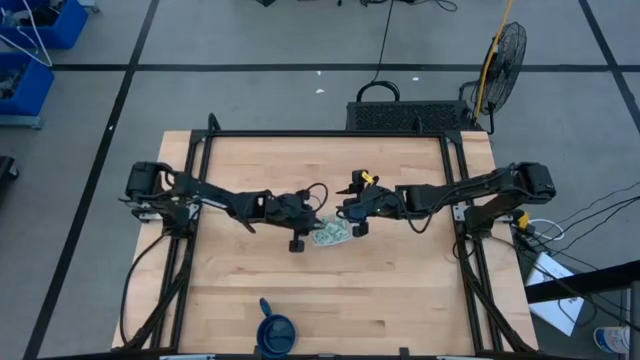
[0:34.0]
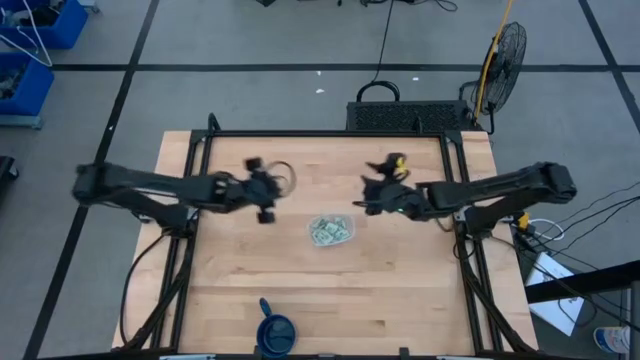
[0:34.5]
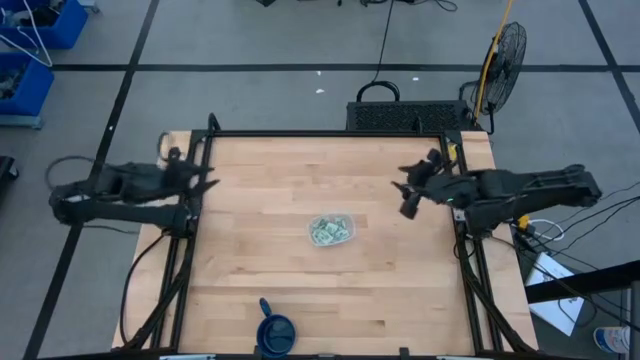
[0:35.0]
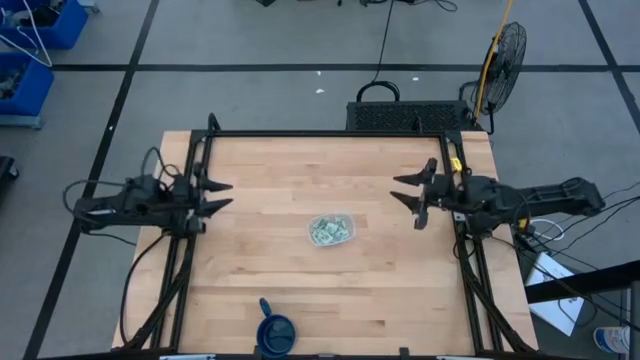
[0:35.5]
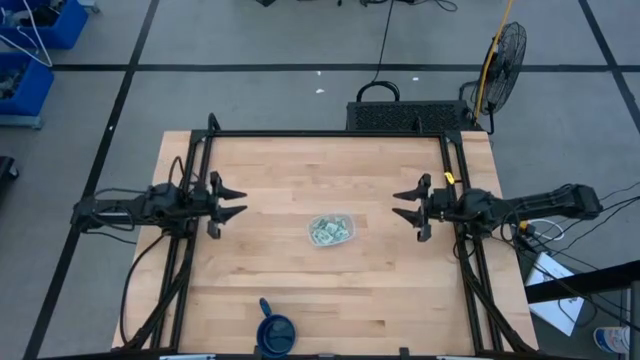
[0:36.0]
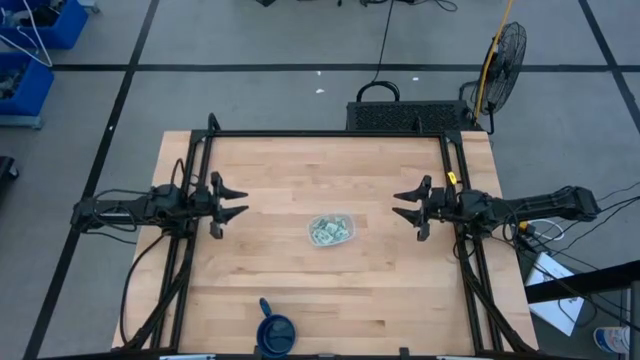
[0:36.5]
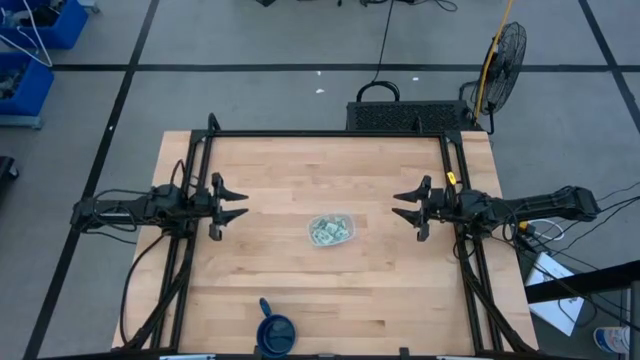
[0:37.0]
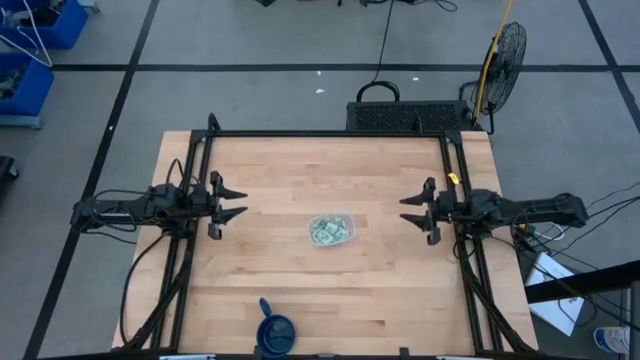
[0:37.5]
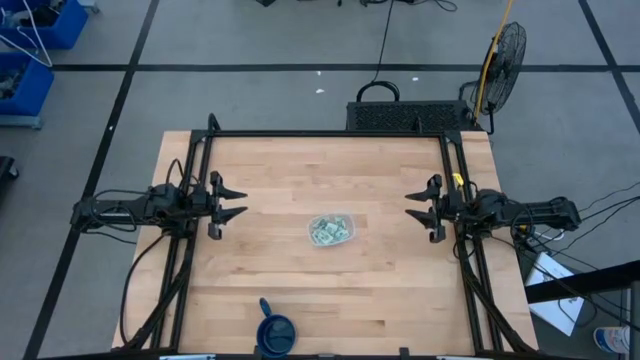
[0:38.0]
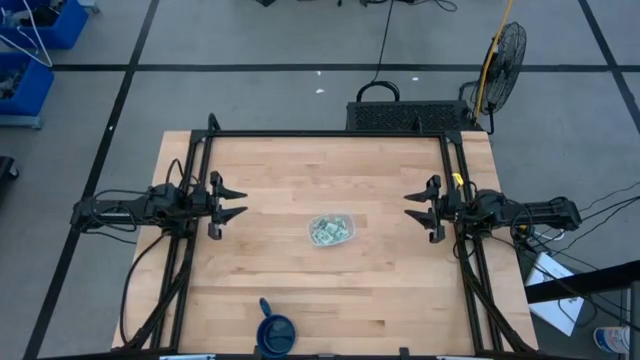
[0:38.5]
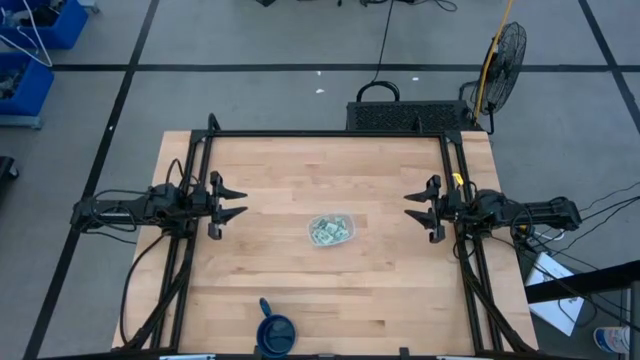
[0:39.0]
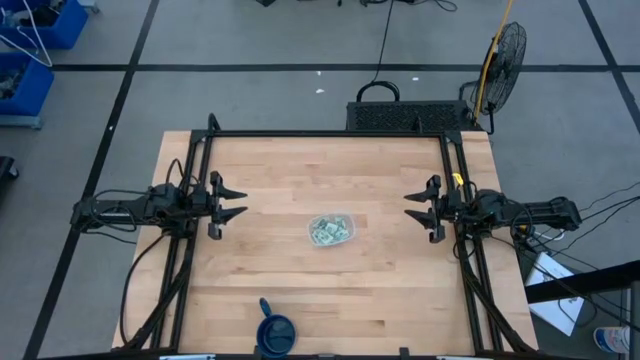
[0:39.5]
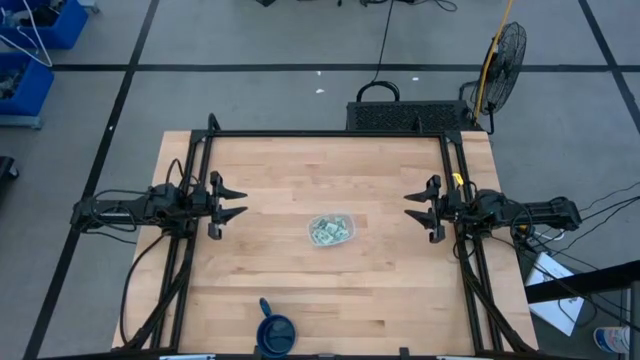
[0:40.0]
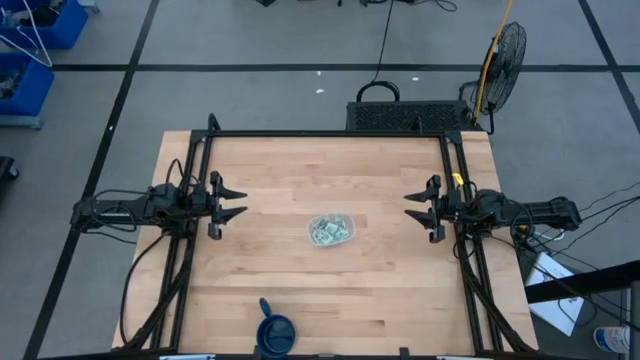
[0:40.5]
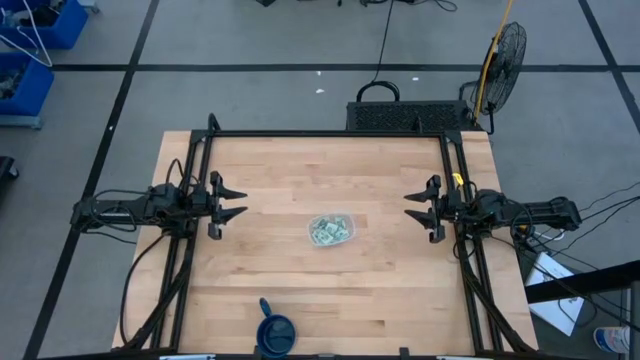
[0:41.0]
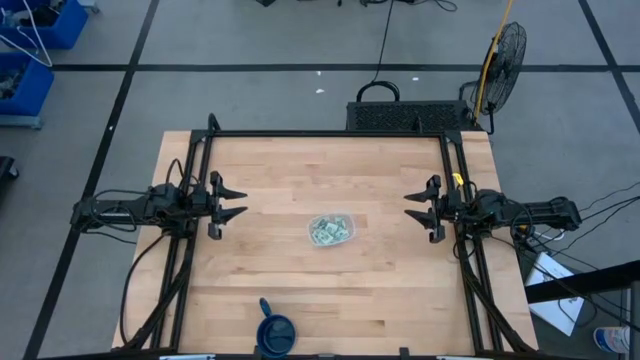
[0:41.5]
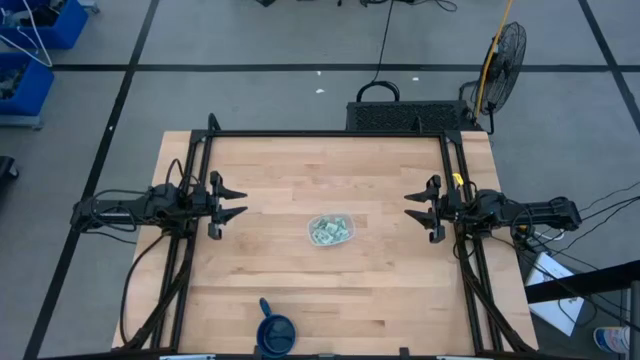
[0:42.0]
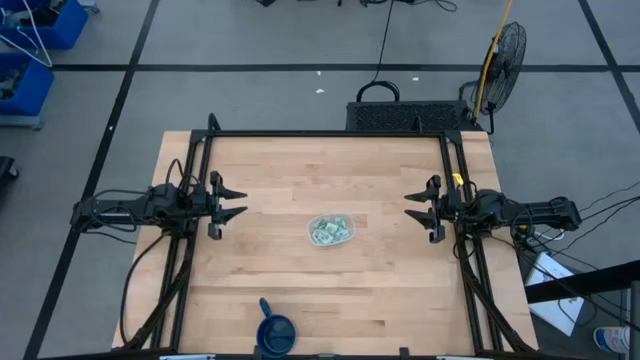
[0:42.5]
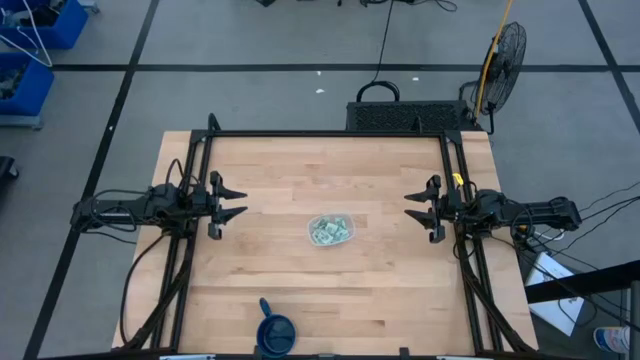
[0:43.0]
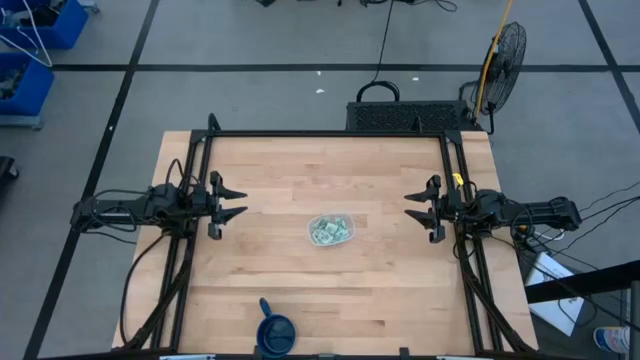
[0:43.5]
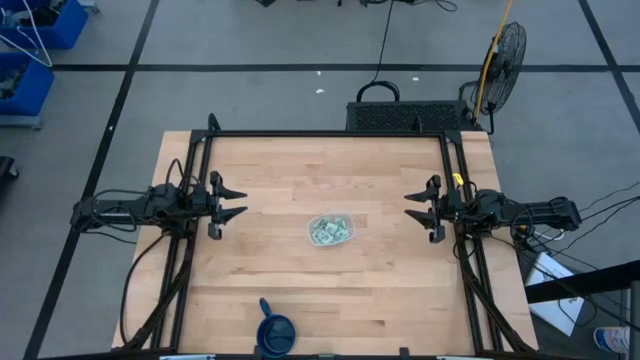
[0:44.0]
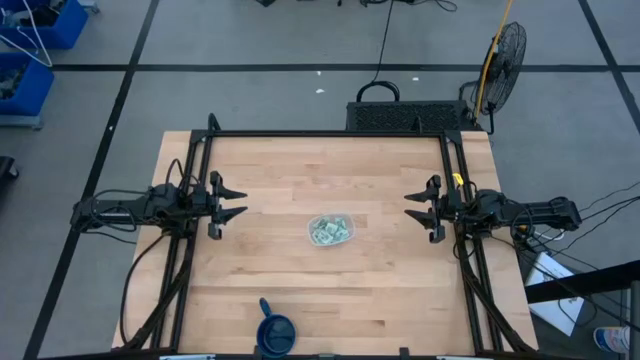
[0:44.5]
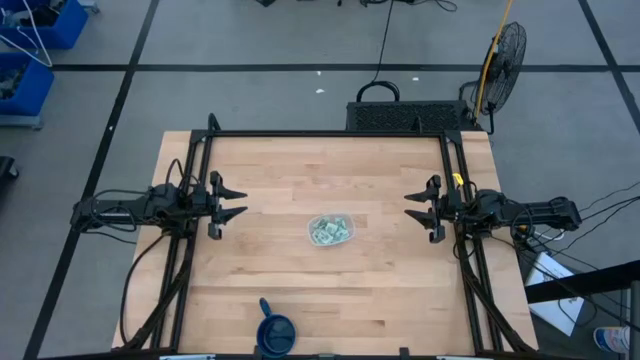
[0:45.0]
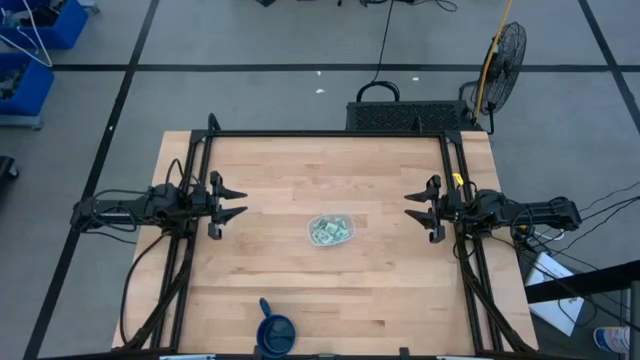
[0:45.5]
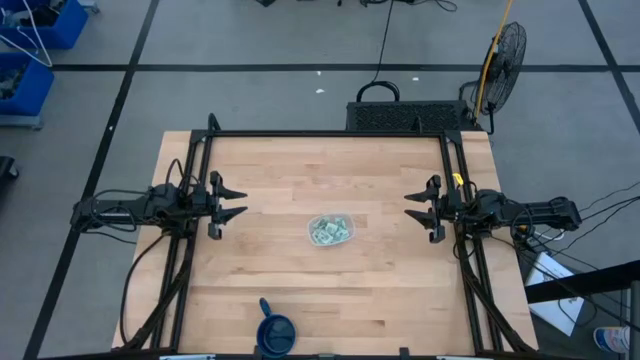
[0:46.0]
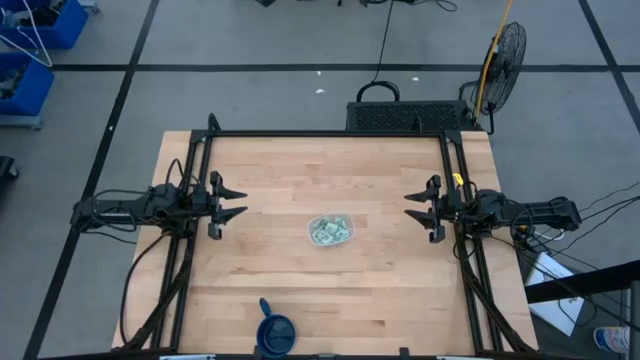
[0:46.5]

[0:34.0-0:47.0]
Task: Pick and place Stevia / Truvia into bins
Return to Home Position

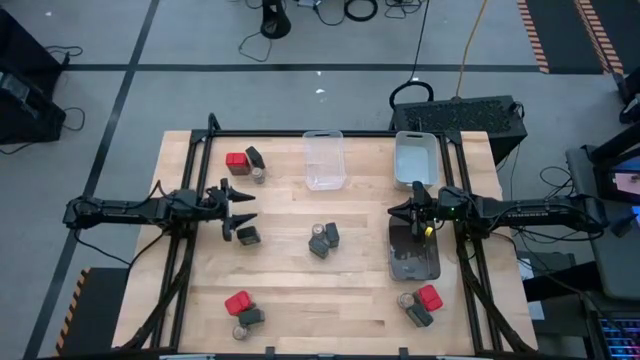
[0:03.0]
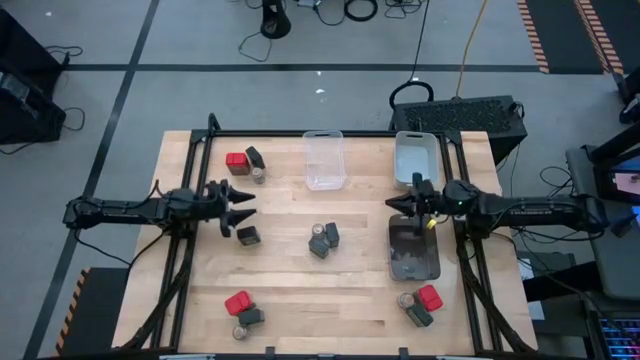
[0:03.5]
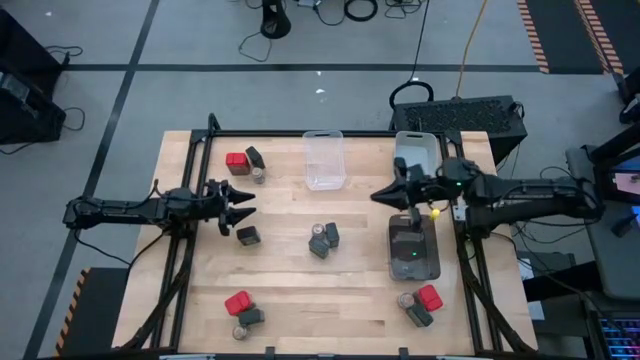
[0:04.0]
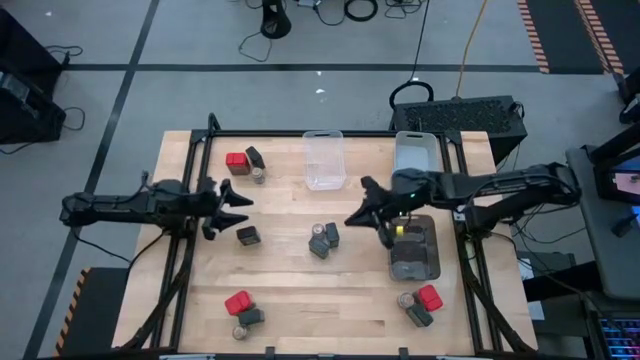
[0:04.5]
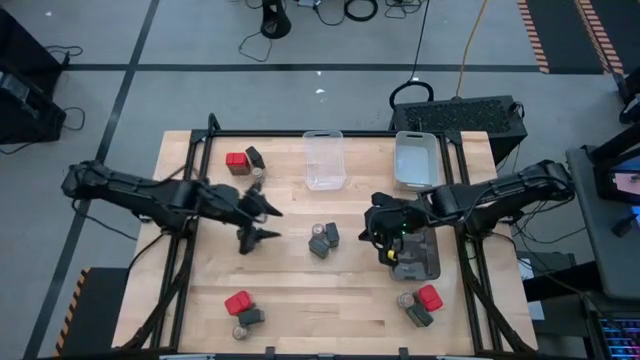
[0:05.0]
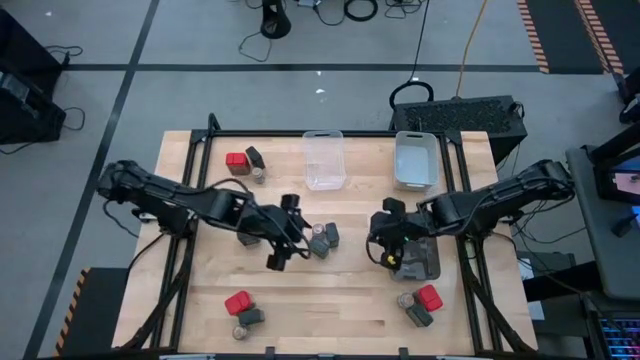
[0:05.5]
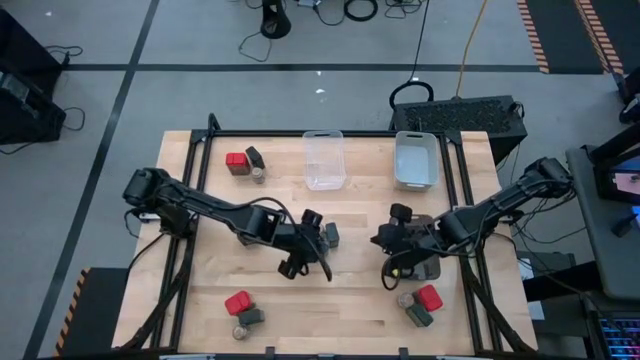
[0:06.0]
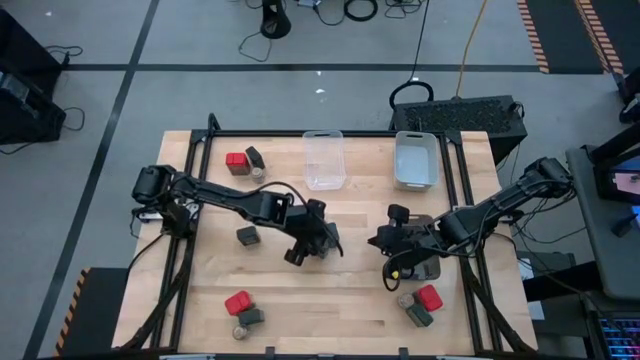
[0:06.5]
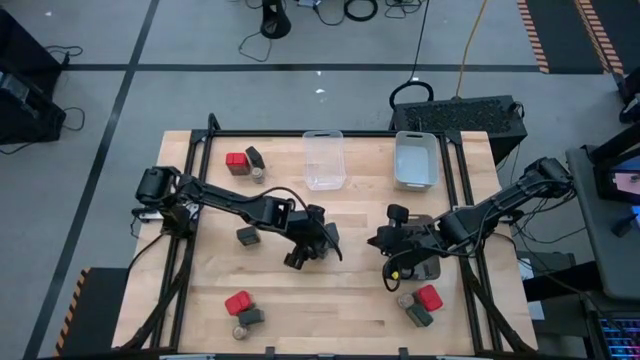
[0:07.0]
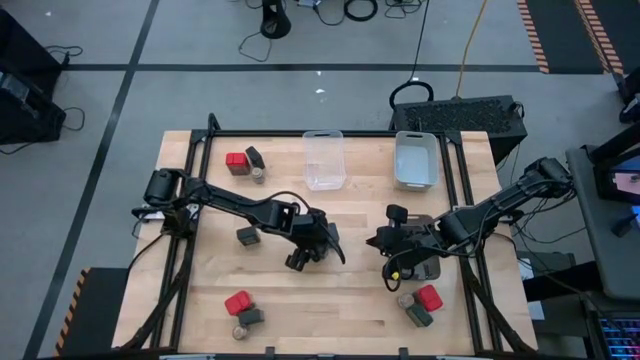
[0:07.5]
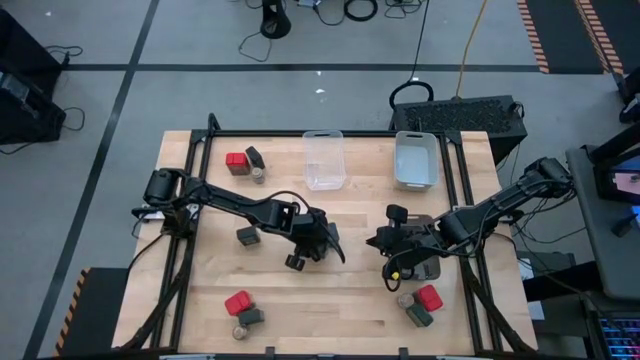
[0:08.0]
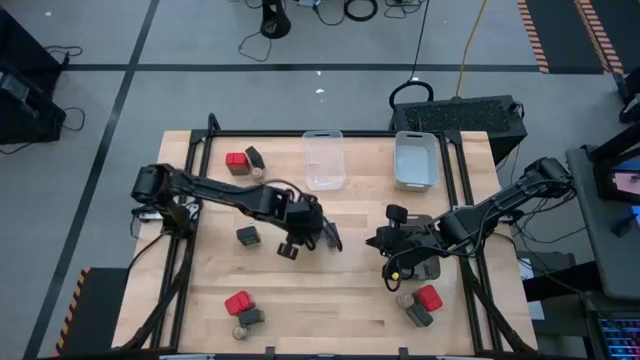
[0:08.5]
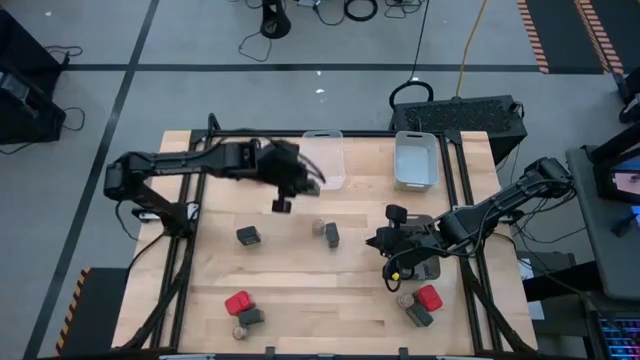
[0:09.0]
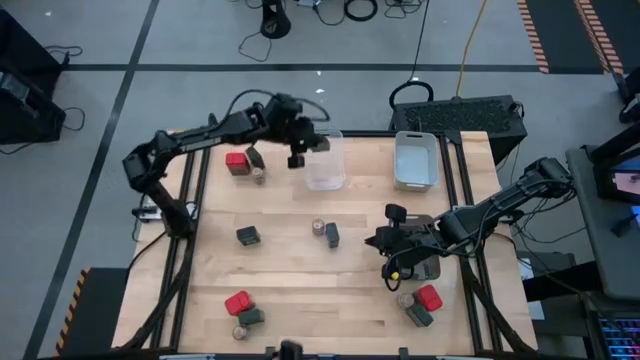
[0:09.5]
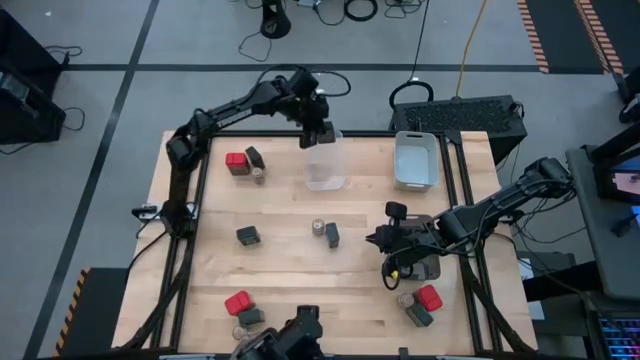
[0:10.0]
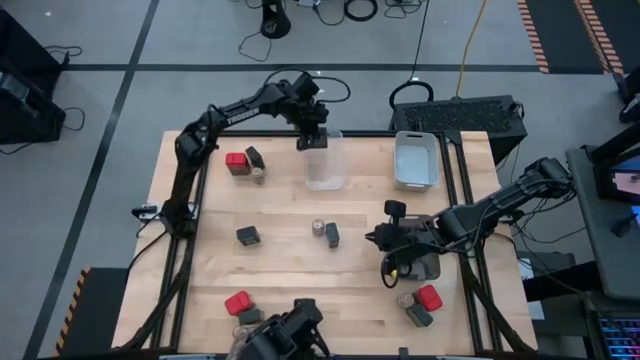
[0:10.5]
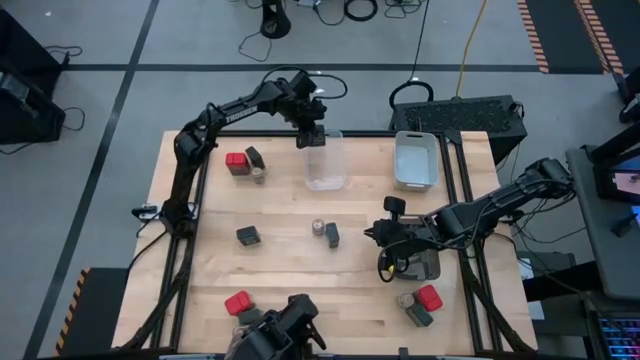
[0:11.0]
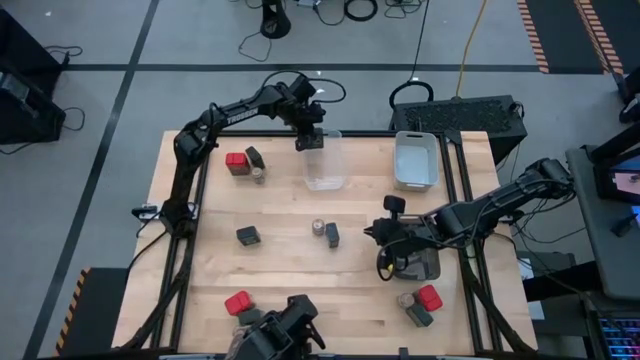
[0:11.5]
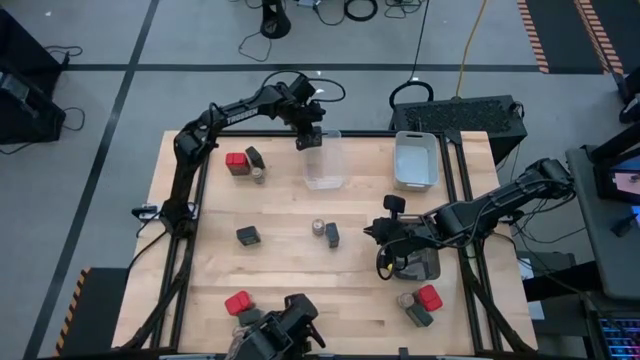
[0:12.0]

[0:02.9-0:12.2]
Task: Sort spices by type
Put the black seasoning can into the transparent bin
